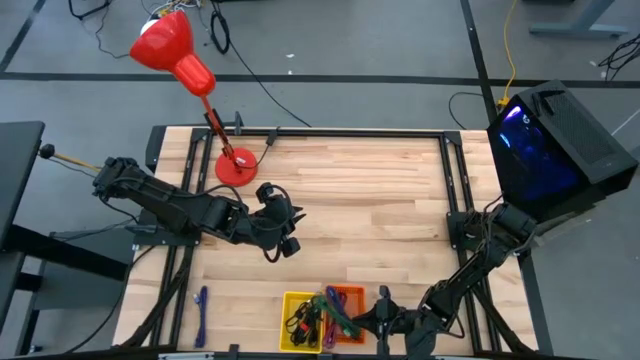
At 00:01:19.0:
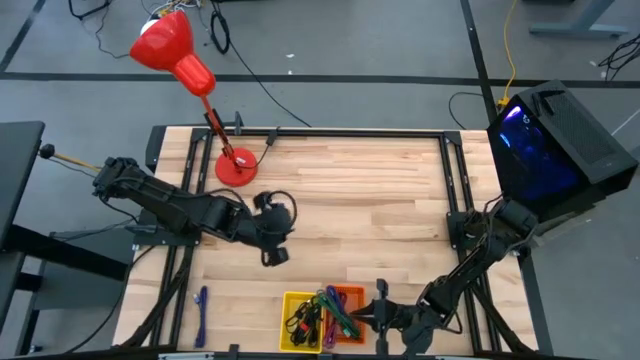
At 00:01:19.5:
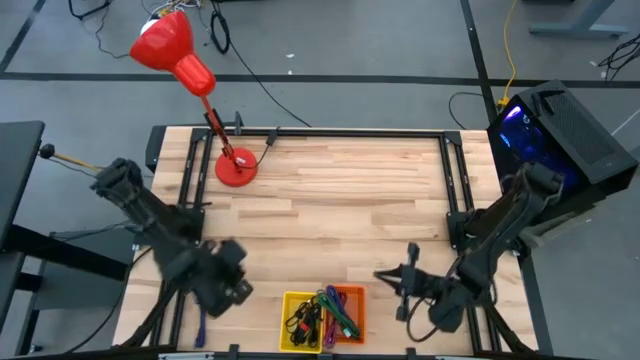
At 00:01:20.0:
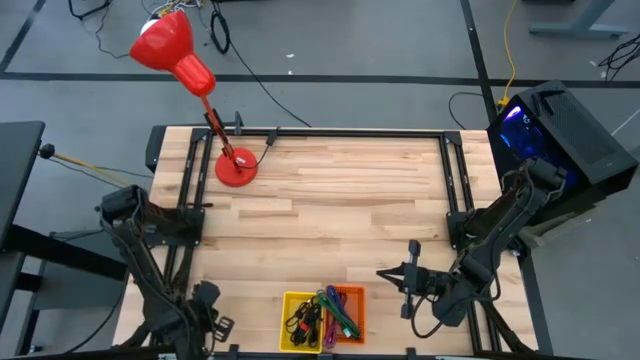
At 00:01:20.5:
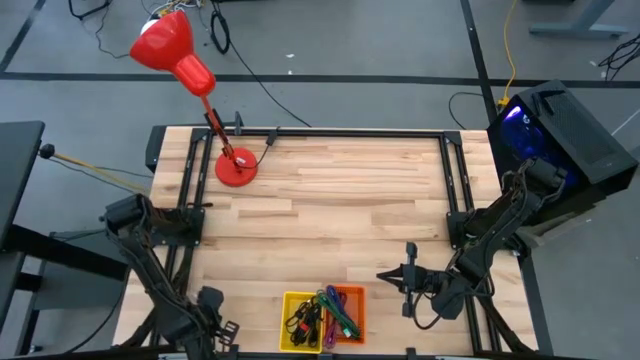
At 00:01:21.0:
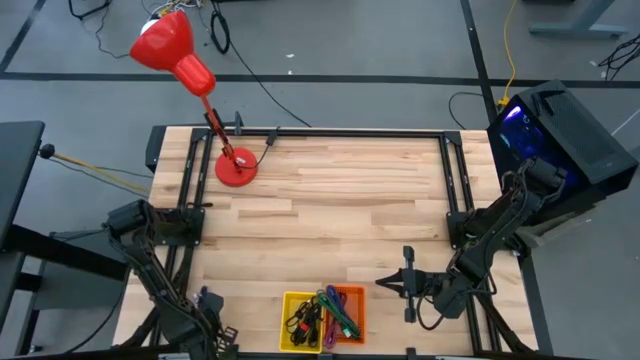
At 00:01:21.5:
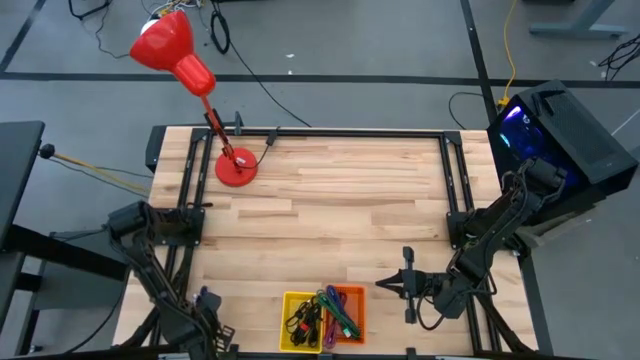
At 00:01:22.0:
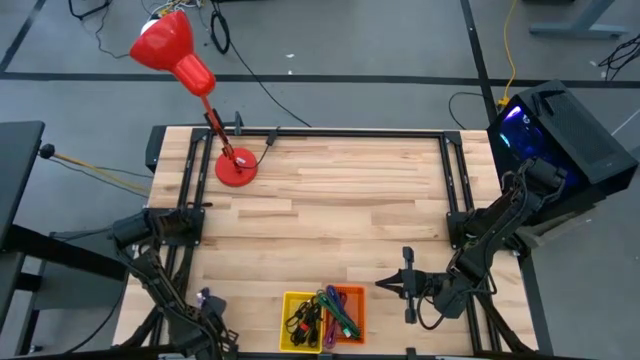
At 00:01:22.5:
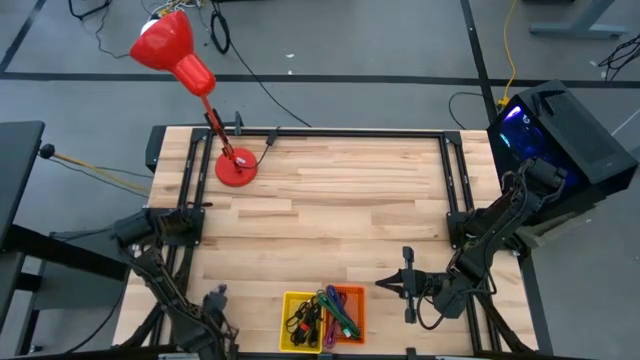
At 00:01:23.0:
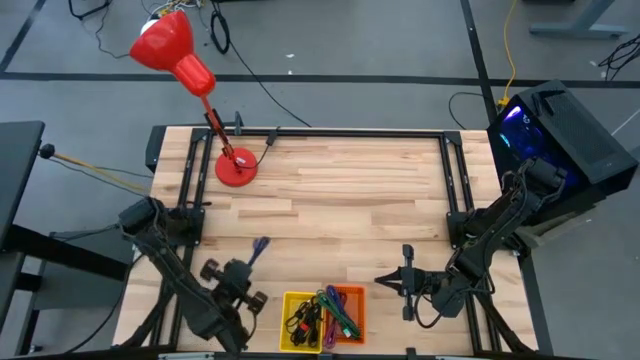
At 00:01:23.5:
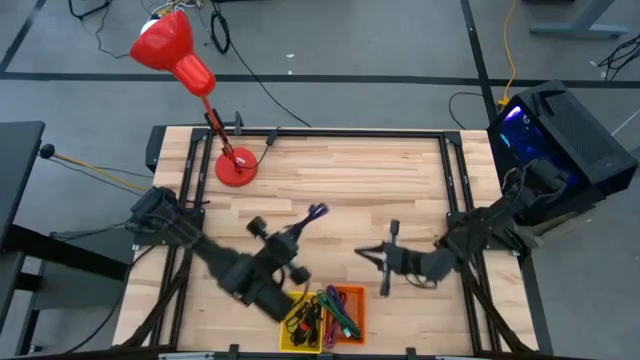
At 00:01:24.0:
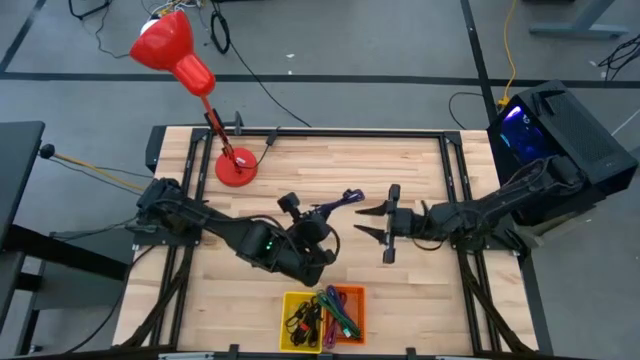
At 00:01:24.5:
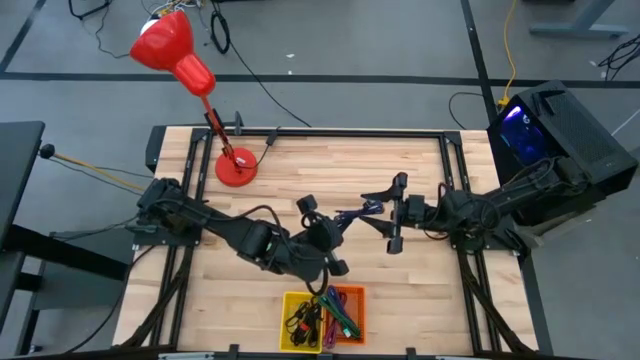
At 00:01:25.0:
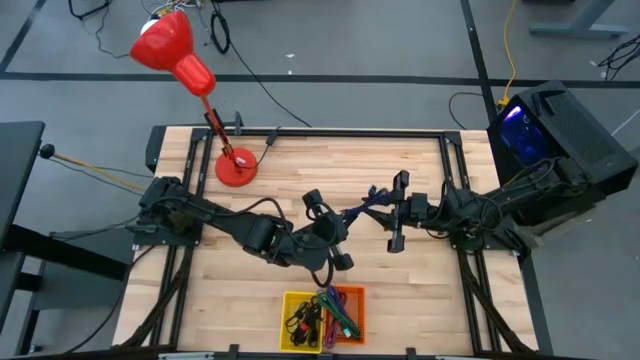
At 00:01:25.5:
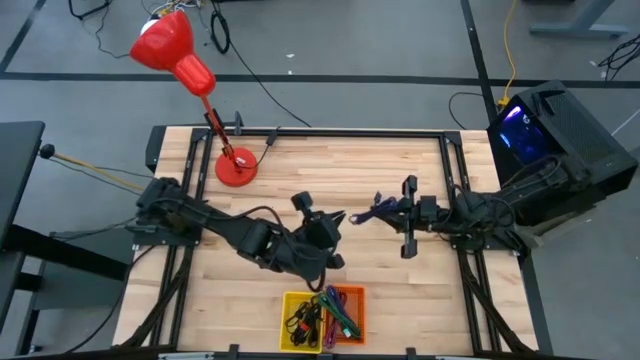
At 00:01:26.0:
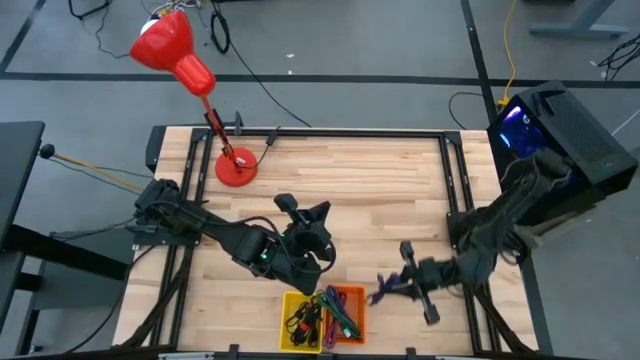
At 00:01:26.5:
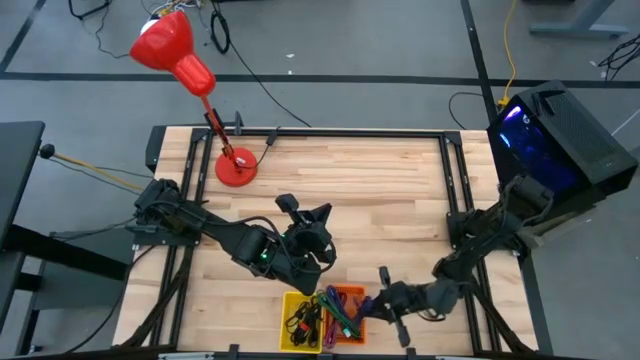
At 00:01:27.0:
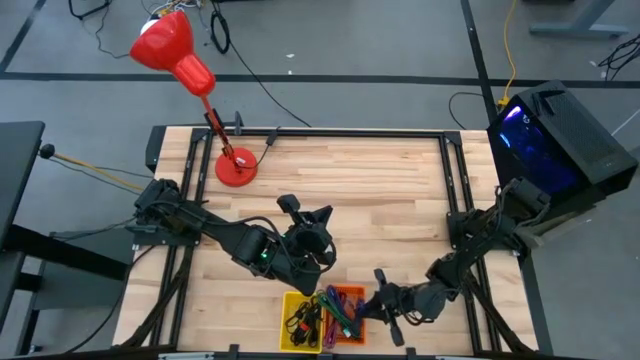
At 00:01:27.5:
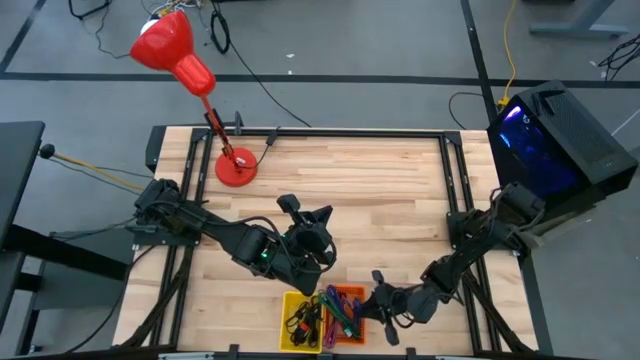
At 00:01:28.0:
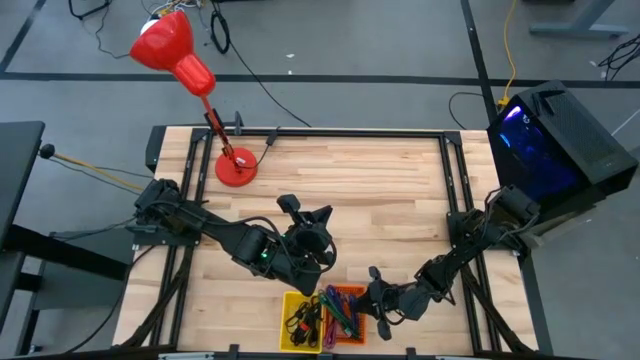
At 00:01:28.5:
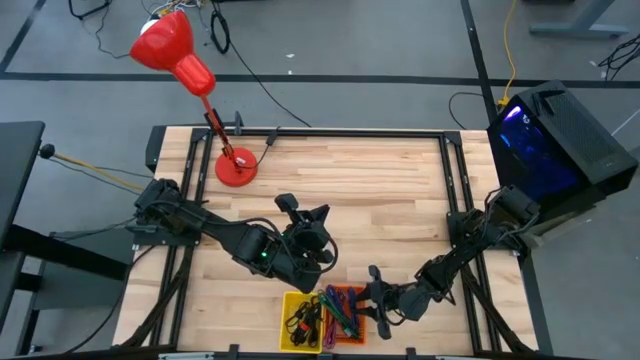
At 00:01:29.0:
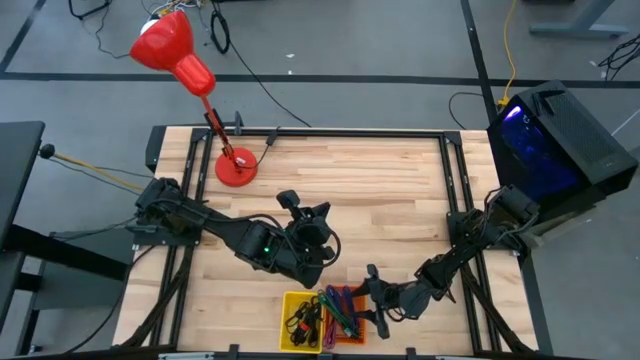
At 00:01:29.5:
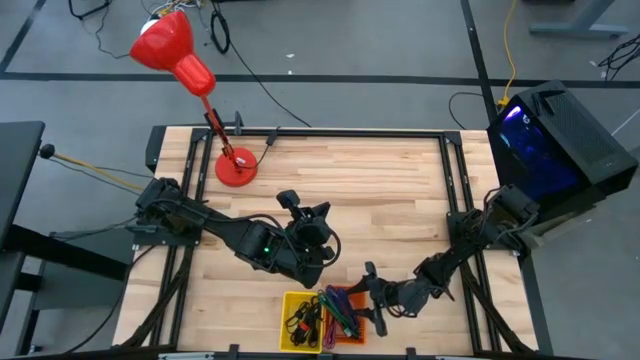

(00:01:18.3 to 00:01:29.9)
Task: Pick & Place USB Port
Put the black and purple charger cable into the orange bin

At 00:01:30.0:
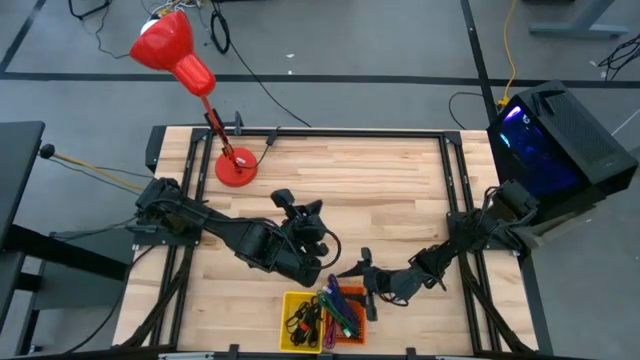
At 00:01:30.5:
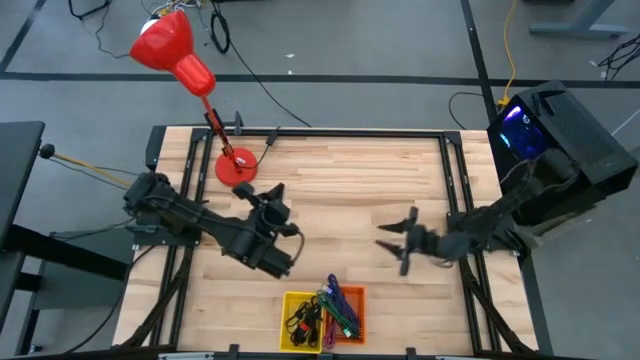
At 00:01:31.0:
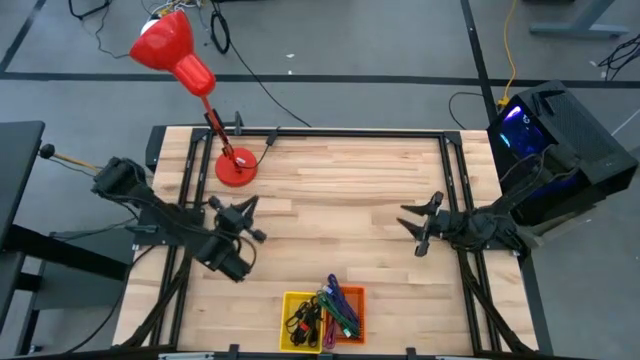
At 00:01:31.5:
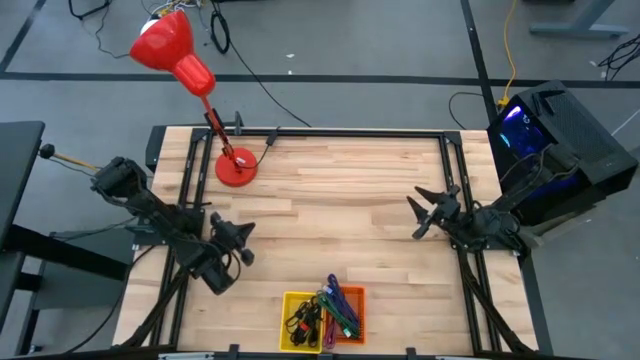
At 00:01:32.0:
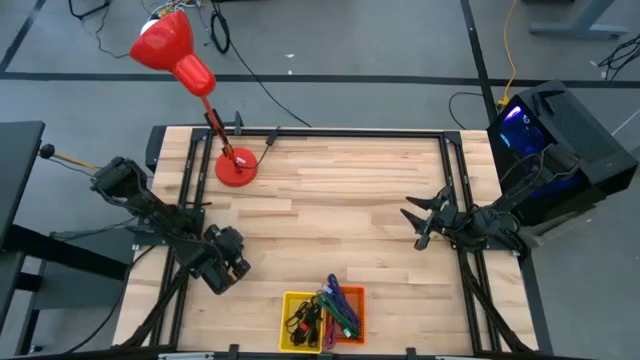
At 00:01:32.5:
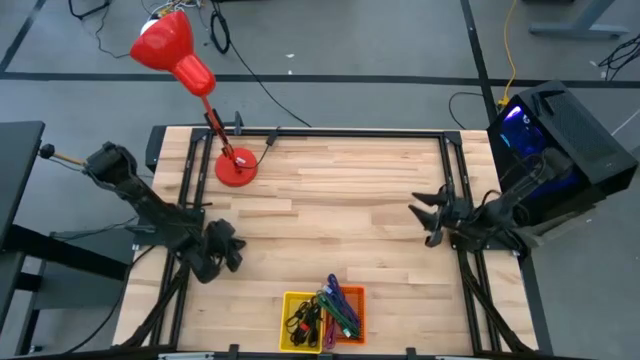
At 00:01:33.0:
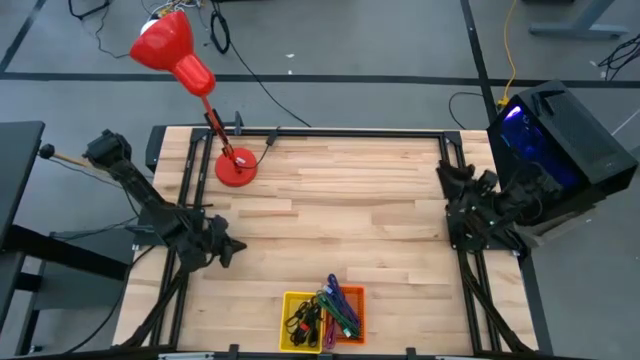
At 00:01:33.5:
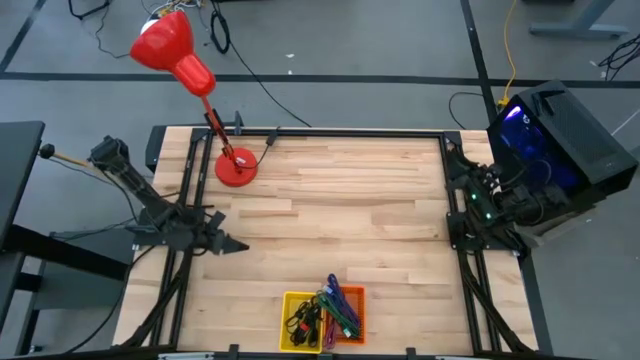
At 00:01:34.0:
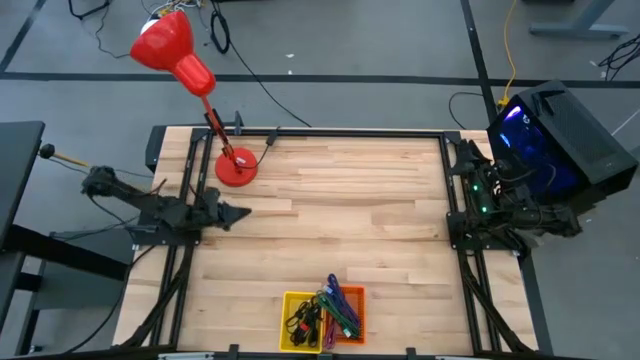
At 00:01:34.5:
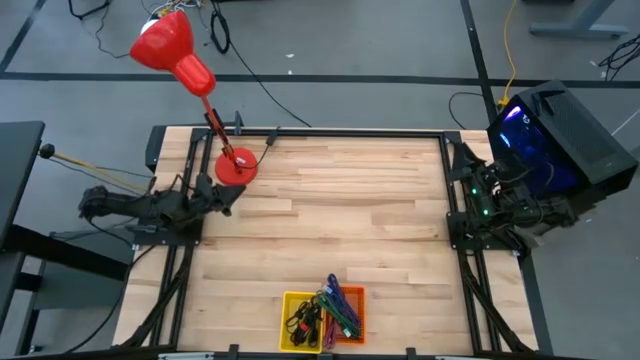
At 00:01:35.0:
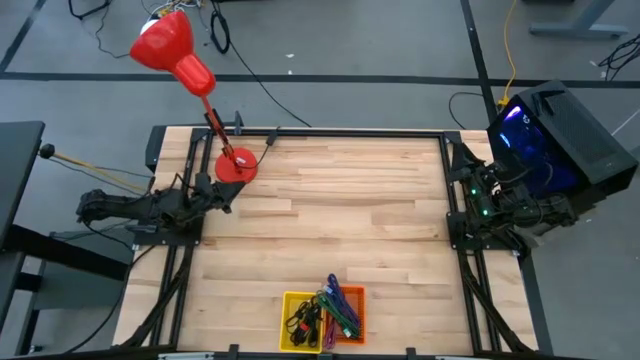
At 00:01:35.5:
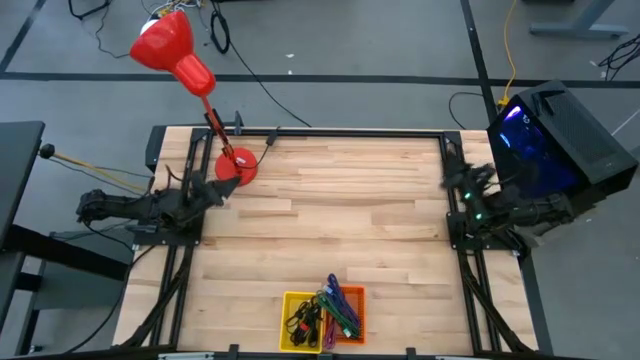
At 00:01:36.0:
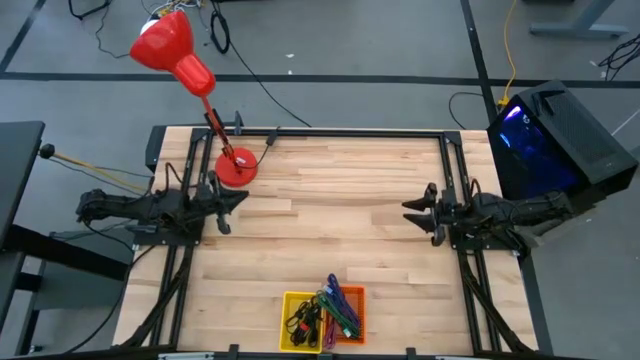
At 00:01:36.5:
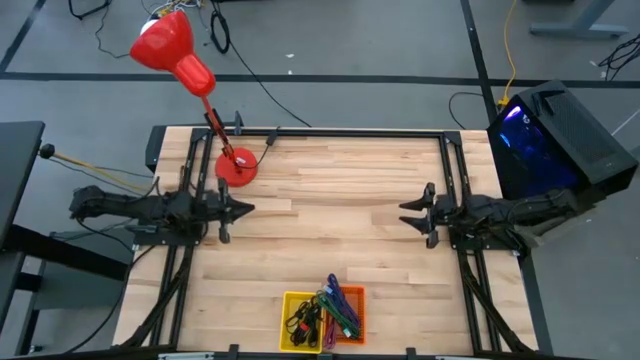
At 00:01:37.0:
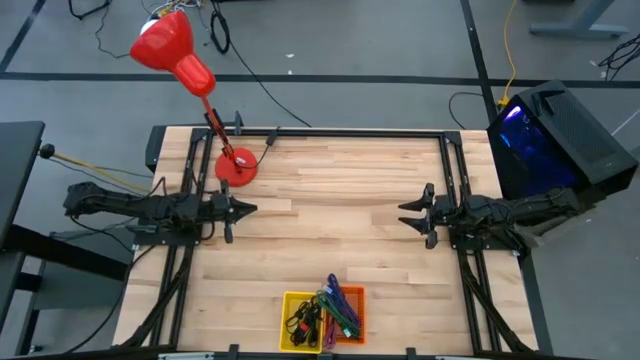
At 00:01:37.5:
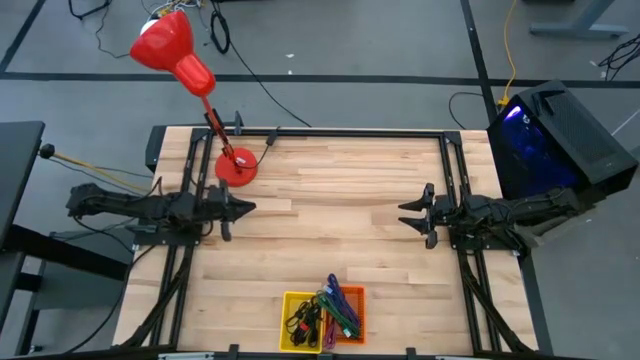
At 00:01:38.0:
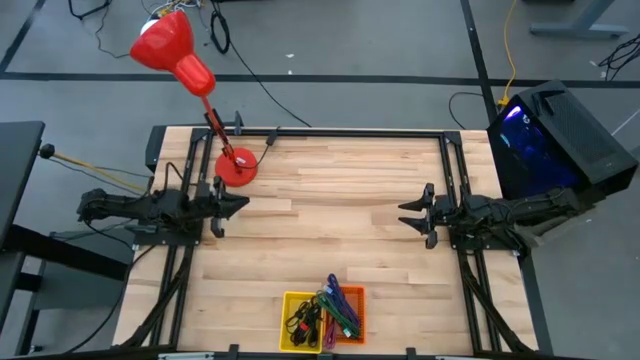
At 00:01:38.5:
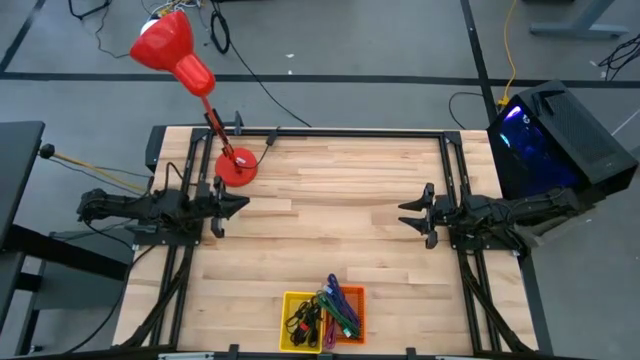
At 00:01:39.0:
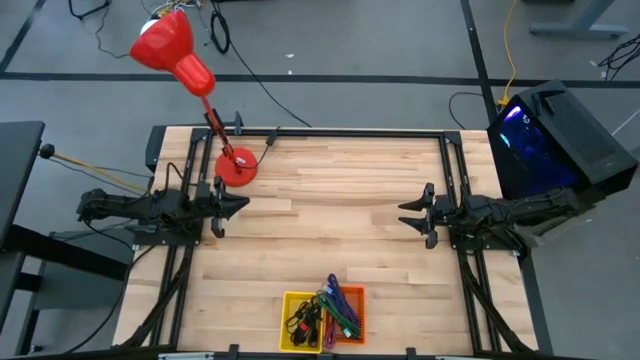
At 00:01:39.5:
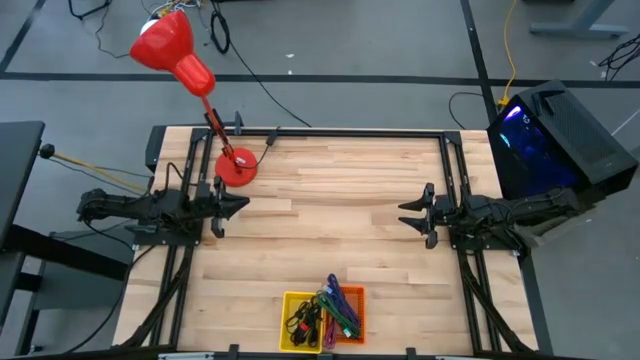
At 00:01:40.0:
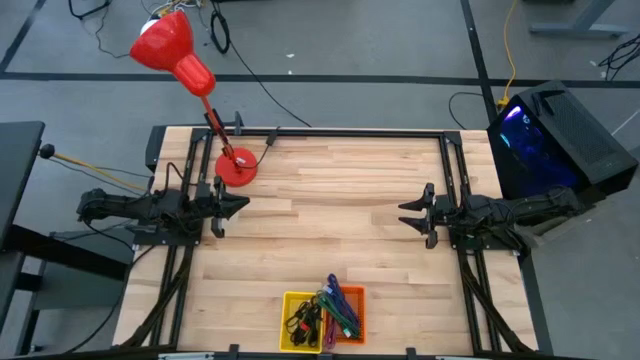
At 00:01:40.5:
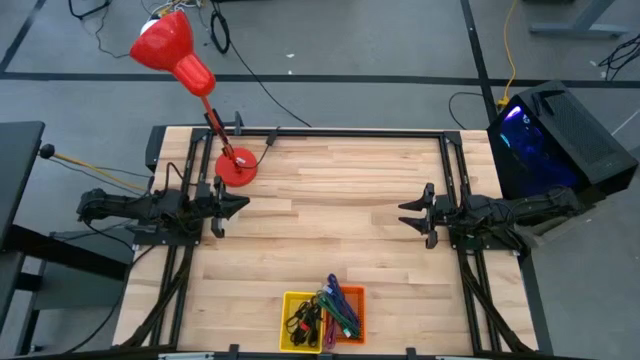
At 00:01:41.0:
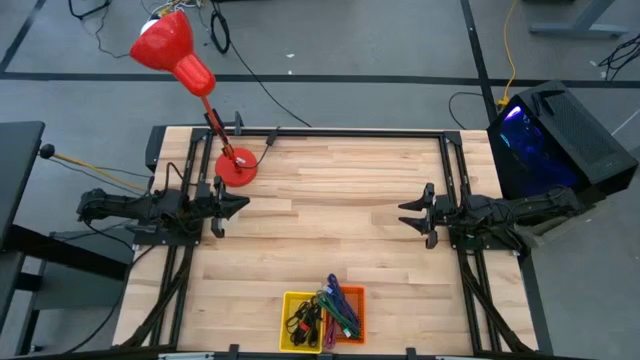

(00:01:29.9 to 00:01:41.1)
Return to Home Position
